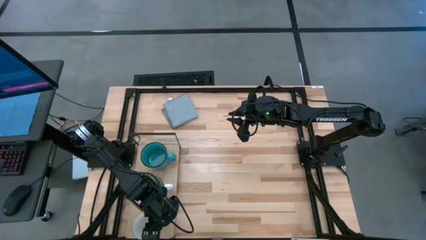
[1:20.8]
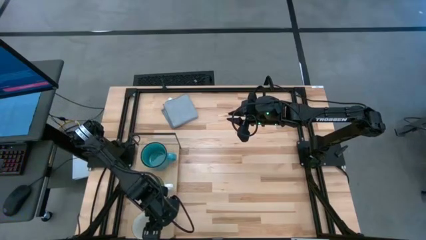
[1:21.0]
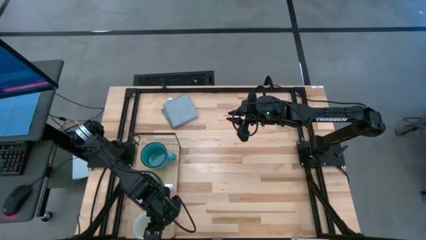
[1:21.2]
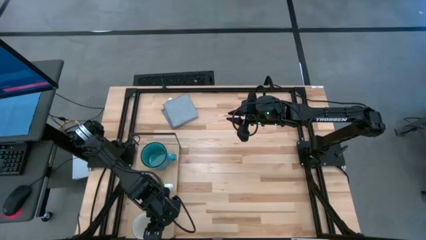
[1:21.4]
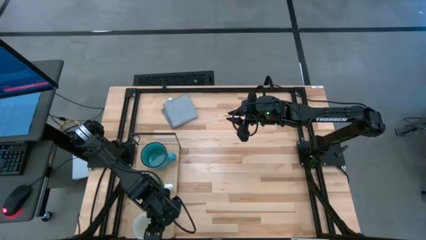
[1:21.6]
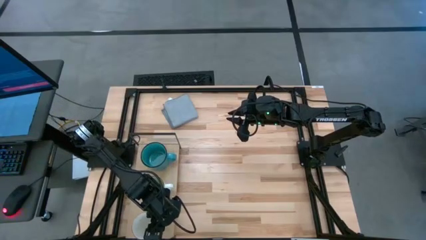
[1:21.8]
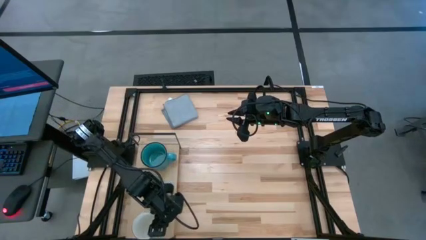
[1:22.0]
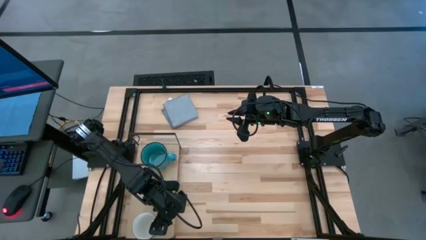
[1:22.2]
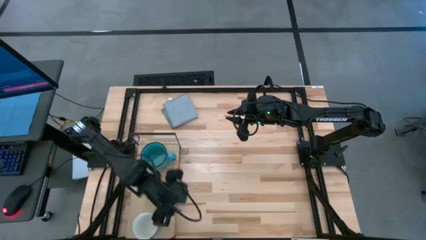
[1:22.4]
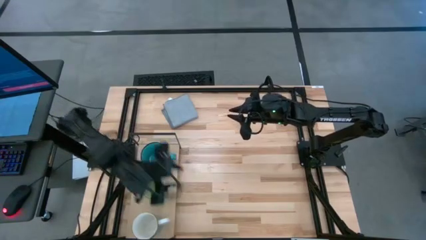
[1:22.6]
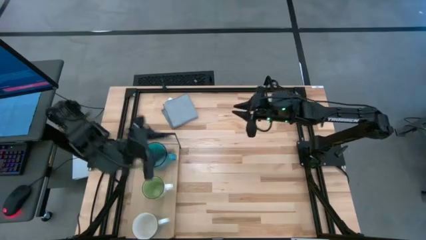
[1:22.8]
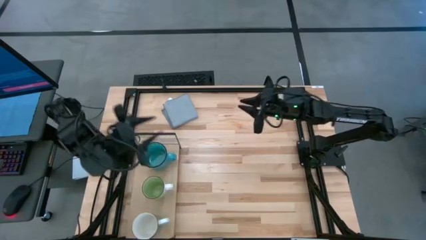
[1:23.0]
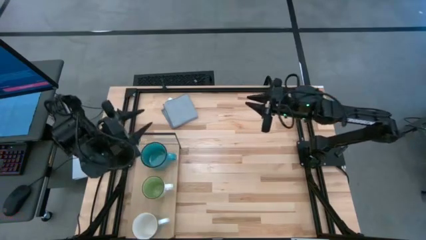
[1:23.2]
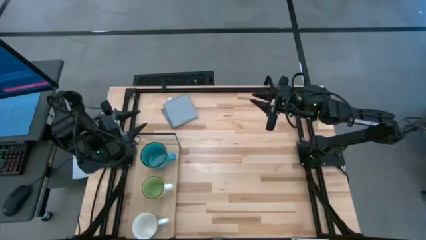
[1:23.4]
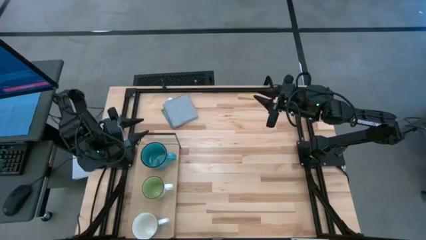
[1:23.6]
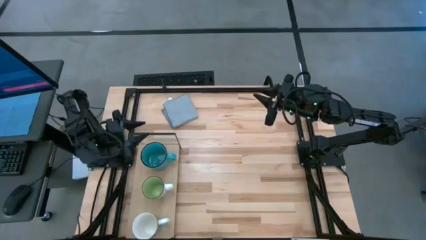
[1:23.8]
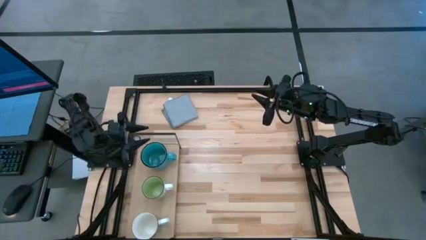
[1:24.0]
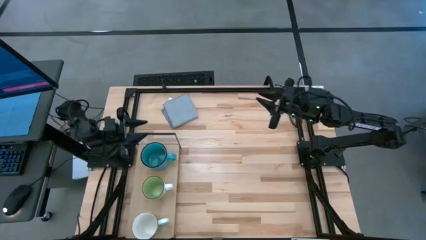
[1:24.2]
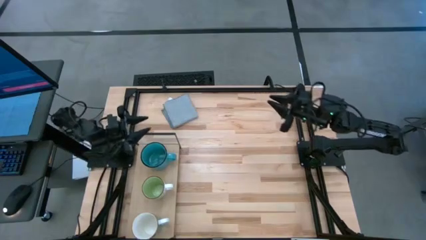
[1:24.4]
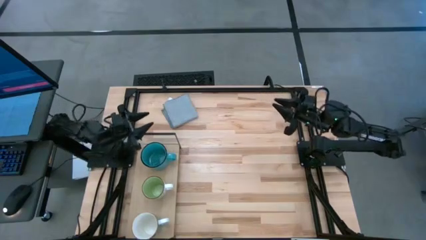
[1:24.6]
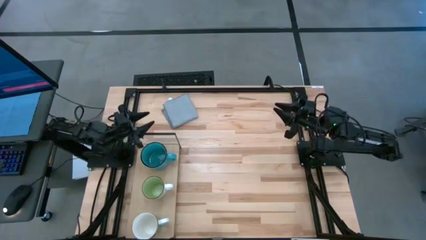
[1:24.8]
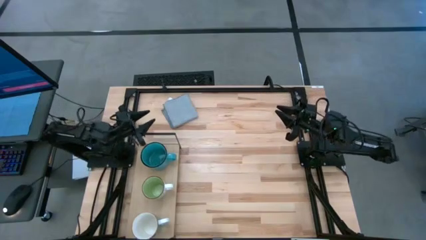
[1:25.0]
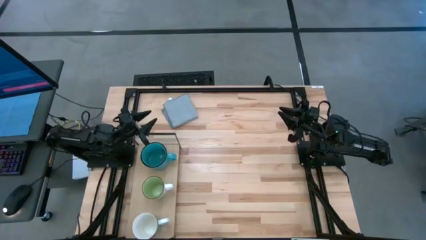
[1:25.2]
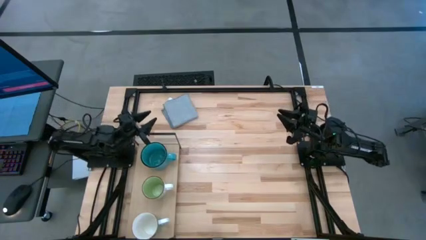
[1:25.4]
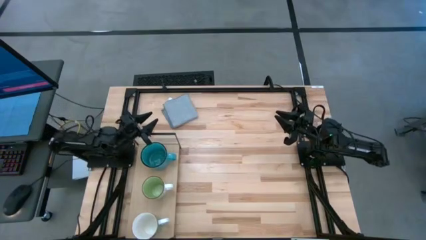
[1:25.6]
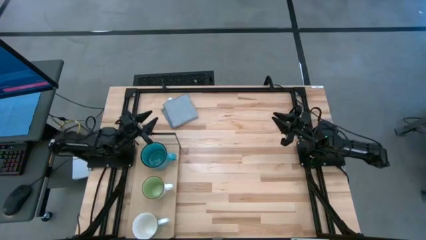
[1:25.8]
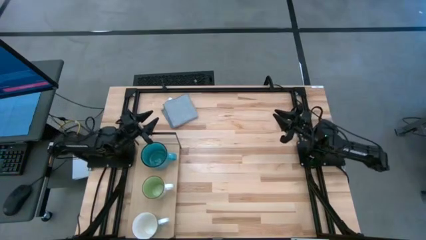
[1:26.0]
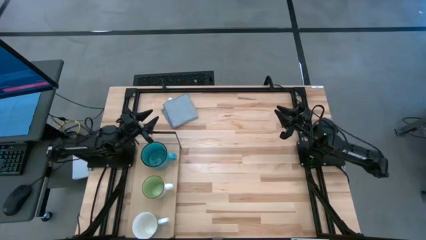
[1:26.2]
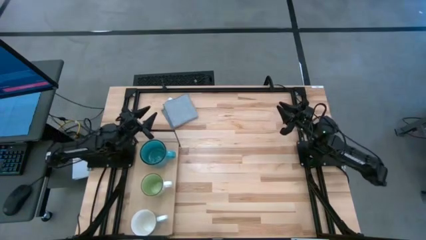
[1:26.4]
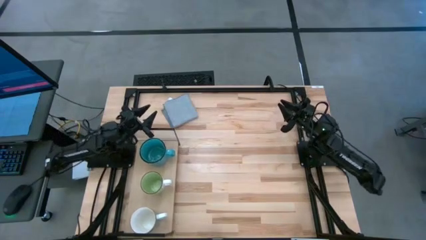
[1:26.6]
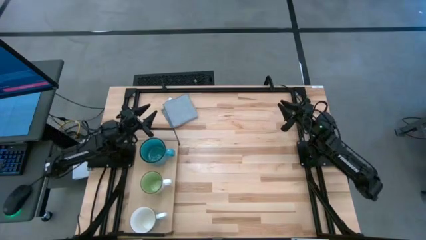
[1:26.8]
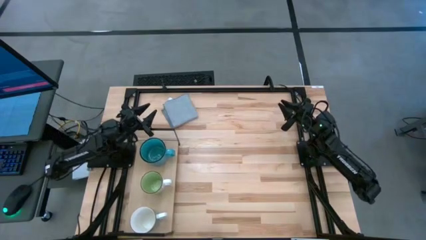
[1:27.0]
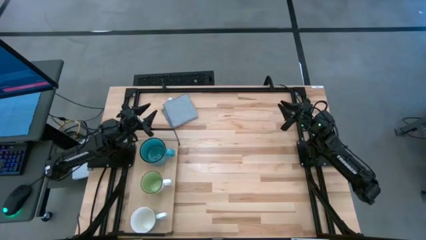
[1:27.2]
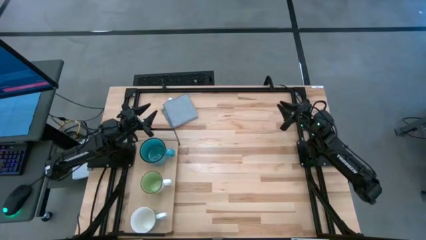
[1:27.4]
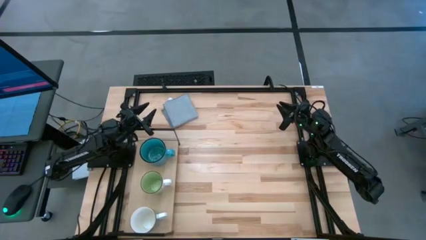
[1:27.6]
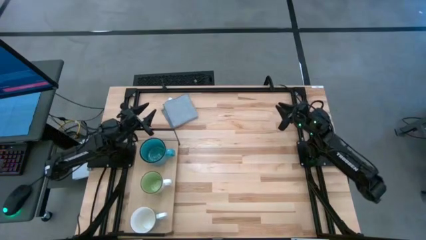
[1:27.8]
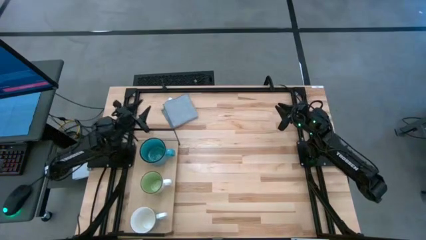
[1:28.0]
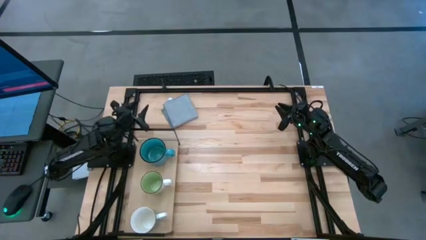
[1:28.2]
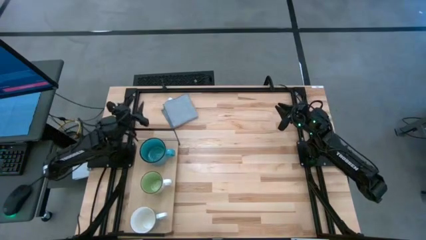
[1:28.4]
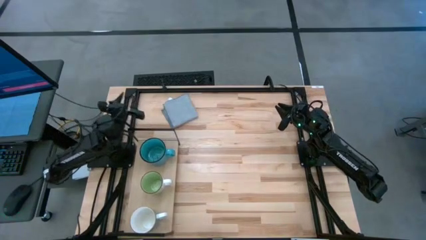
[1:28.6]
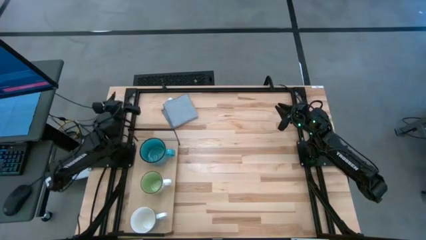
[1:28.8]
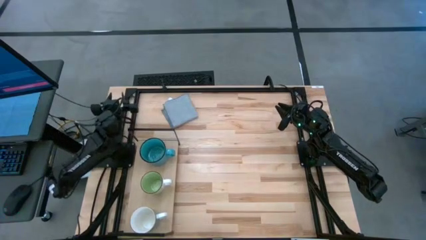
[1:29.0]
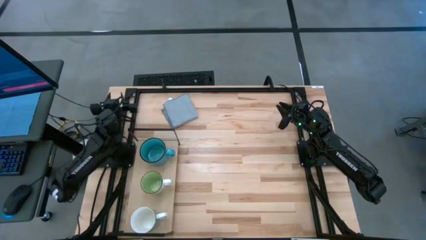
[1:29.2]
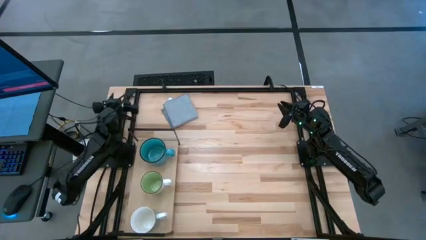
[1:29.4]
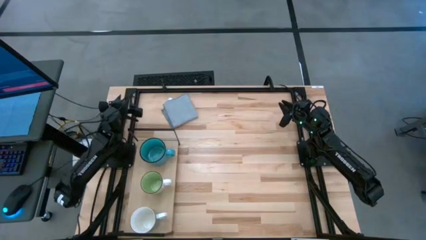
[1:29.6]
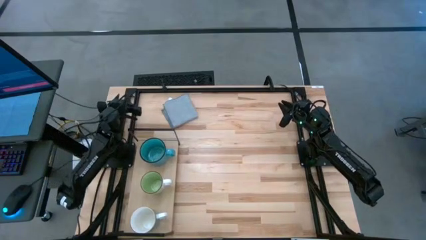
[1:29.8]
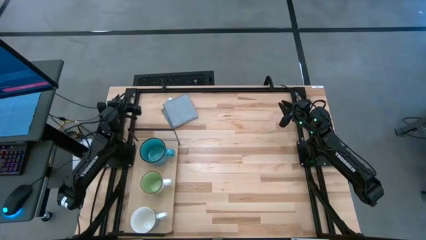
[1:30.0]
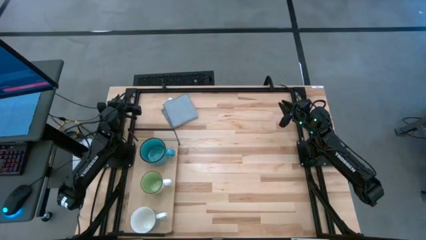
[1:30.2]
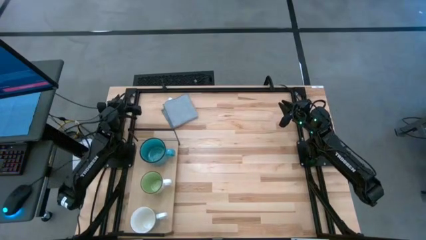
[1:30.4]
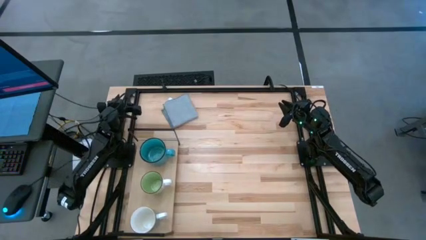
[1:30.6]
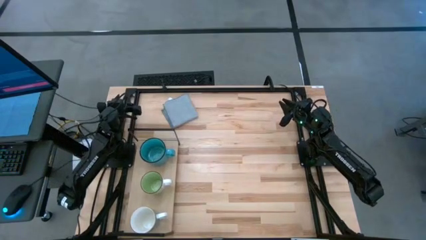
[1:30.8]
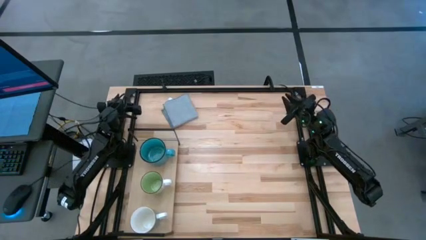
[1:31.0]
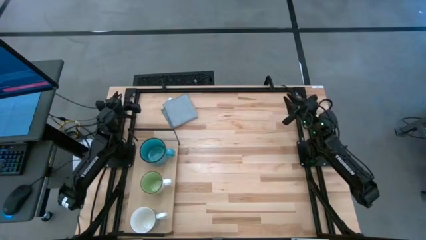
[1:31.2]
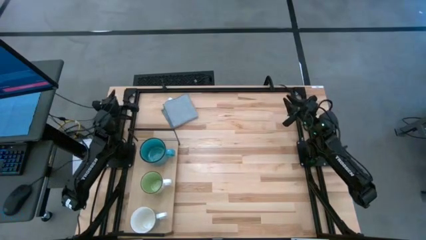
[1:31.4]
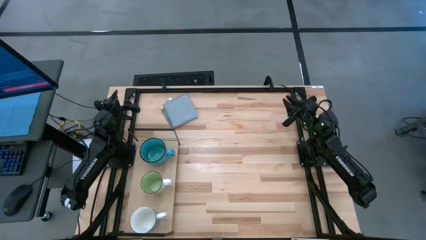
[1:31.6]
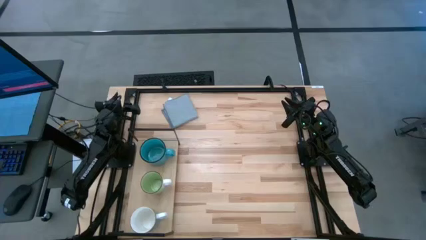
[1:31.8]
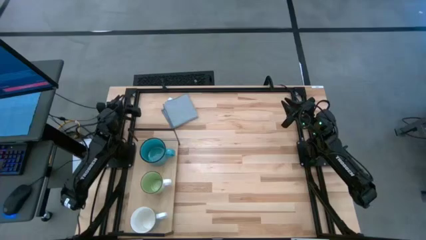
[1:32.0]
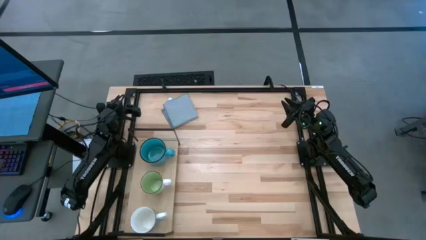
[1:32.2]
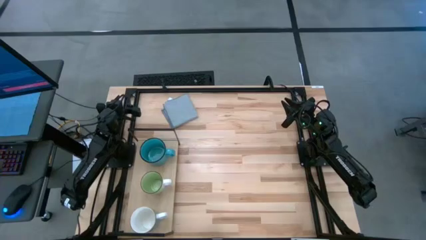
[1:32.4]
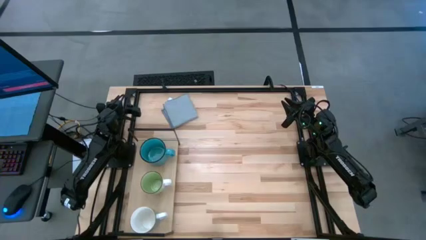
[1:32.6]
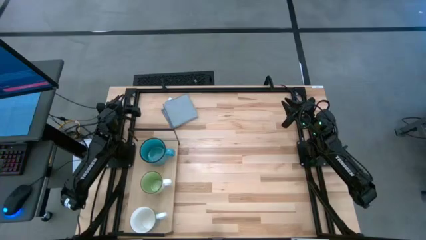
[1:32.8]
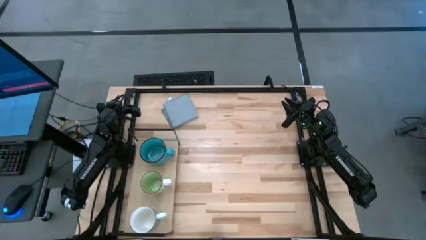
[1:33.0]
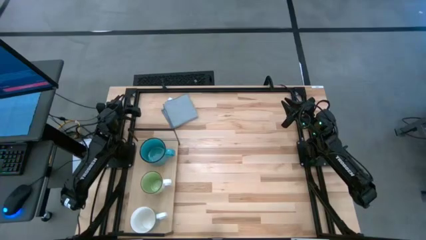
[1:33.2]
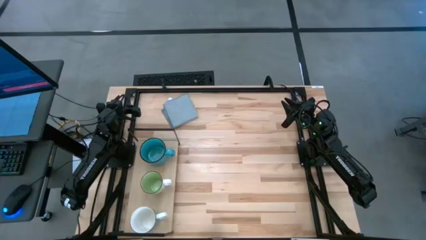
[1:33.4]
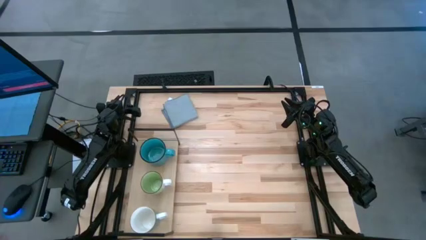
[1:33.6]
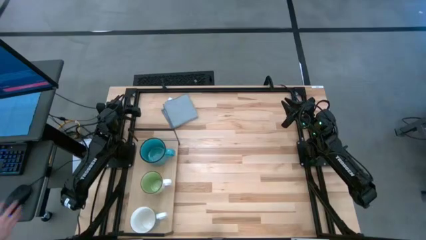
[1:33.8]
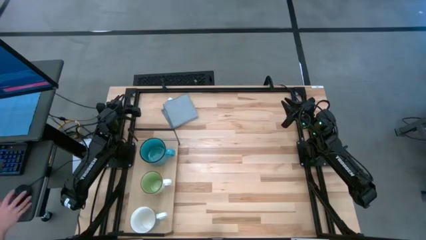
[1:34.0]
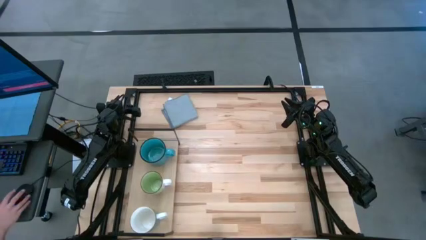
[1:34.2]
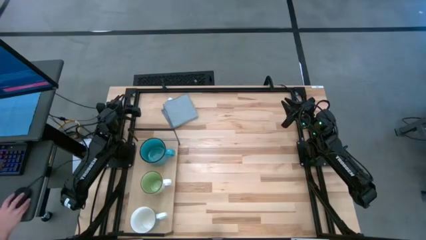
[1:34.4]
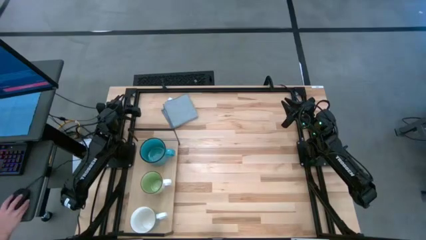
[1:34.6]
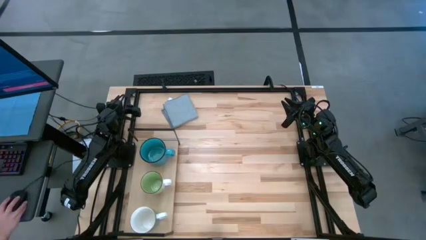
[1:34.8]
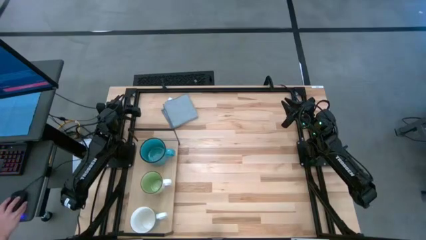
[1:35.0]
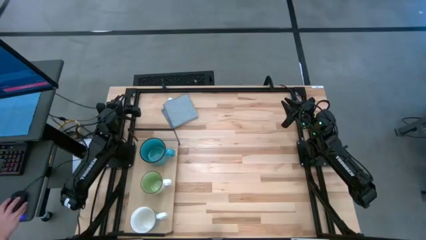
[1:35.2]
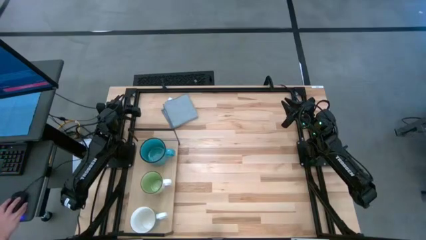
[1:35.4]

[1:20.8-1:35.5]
Task: Stack small to large cups/mugs on shelf
Return to Home Position
